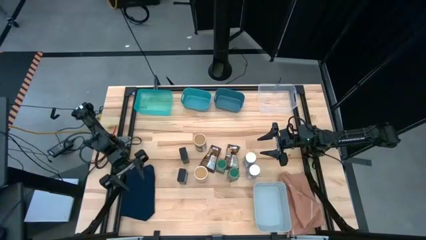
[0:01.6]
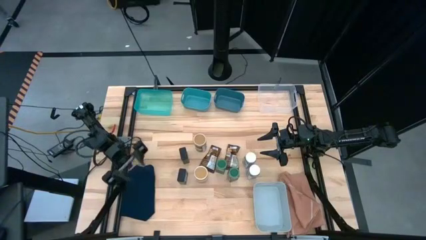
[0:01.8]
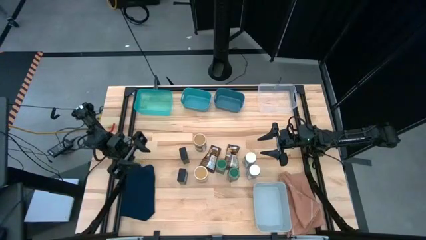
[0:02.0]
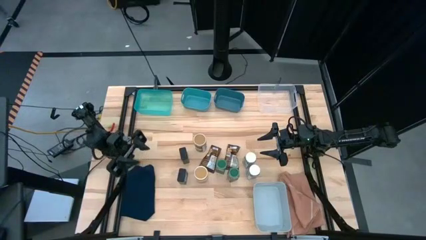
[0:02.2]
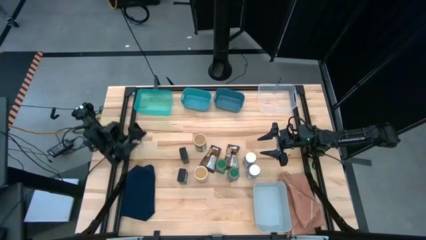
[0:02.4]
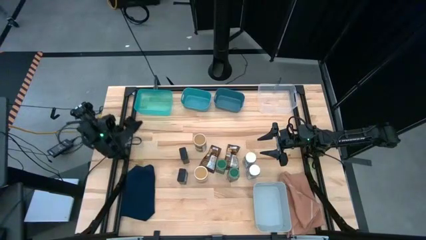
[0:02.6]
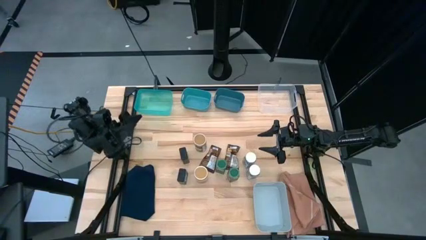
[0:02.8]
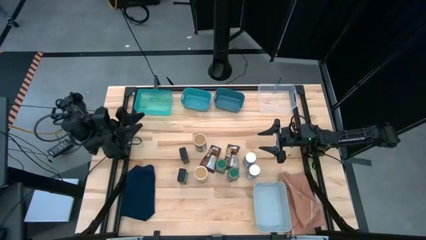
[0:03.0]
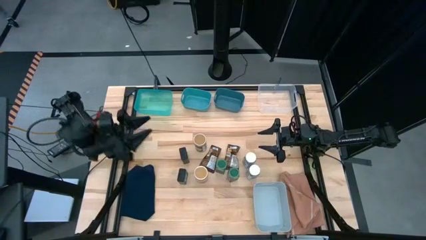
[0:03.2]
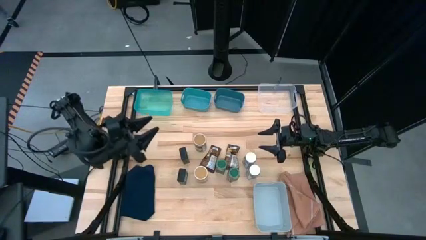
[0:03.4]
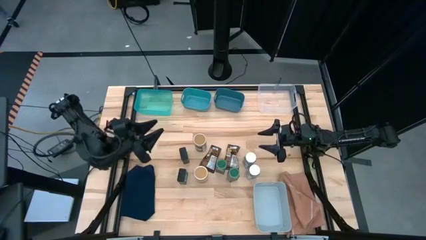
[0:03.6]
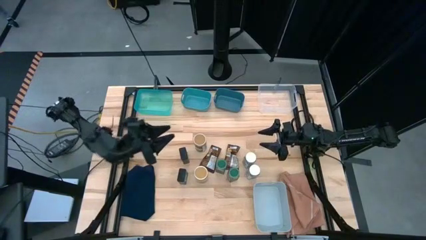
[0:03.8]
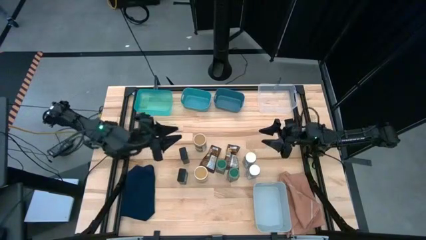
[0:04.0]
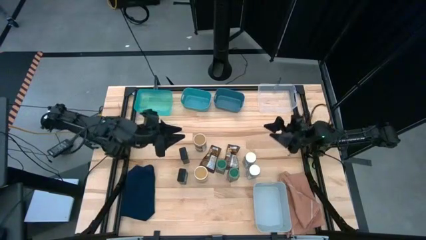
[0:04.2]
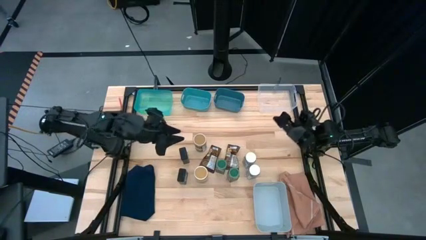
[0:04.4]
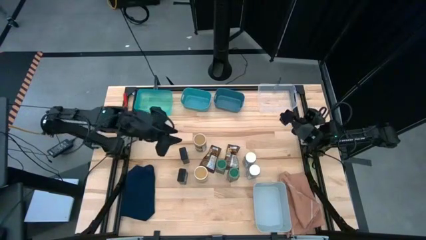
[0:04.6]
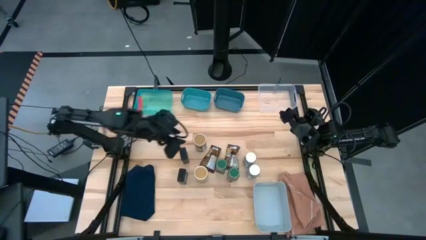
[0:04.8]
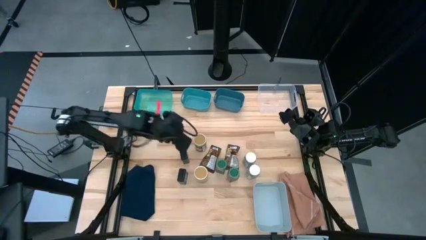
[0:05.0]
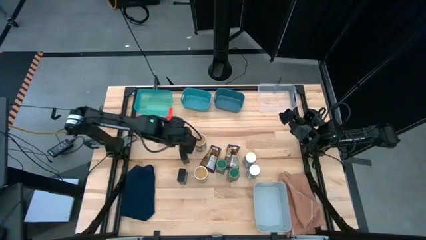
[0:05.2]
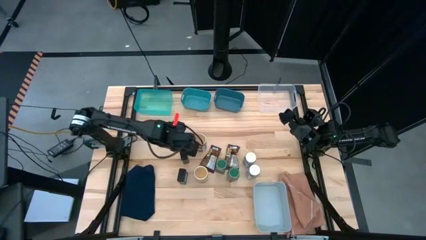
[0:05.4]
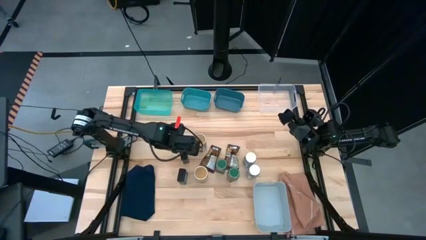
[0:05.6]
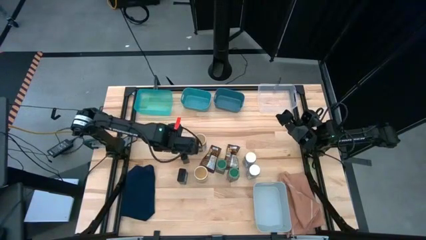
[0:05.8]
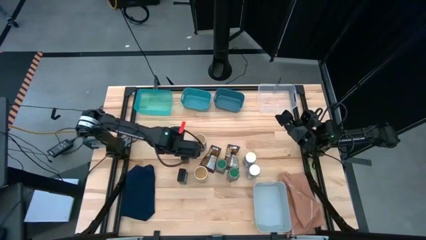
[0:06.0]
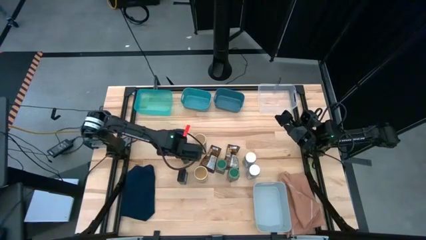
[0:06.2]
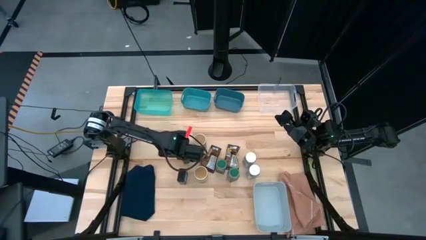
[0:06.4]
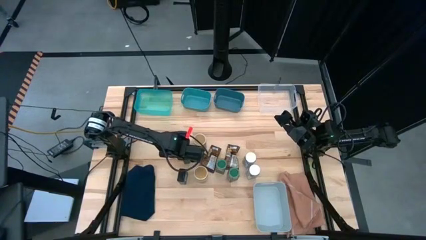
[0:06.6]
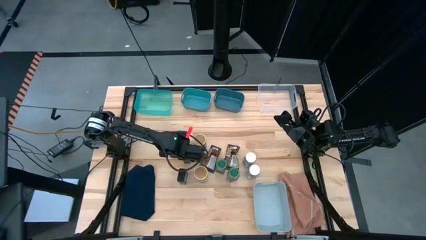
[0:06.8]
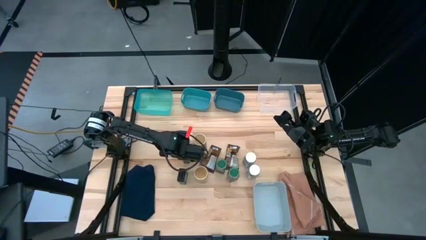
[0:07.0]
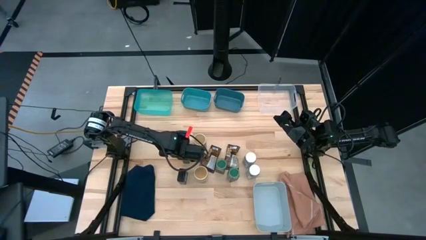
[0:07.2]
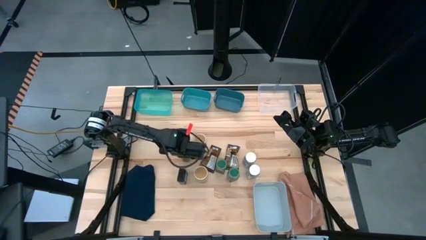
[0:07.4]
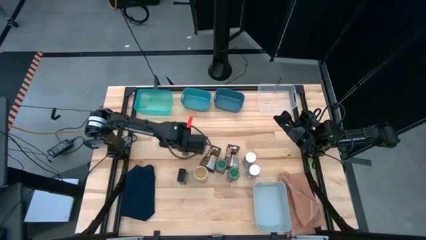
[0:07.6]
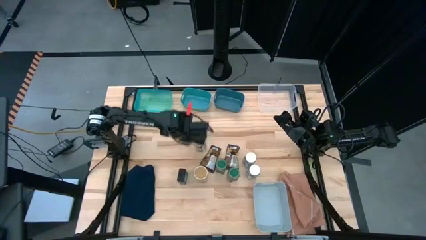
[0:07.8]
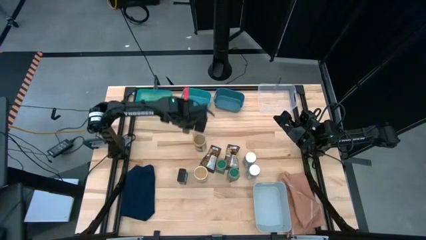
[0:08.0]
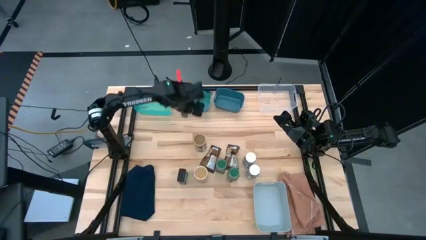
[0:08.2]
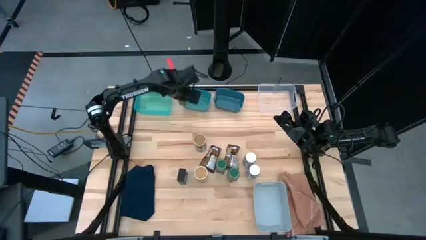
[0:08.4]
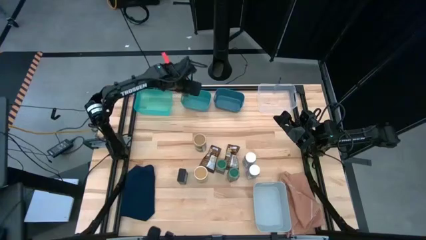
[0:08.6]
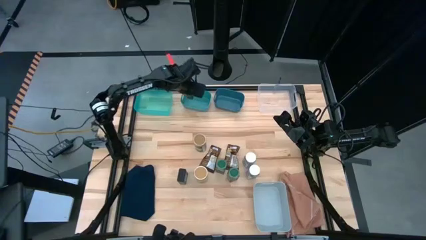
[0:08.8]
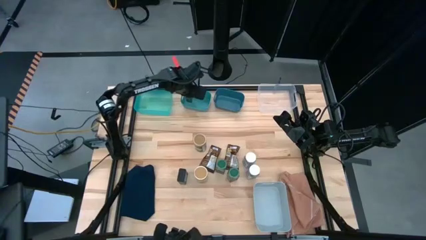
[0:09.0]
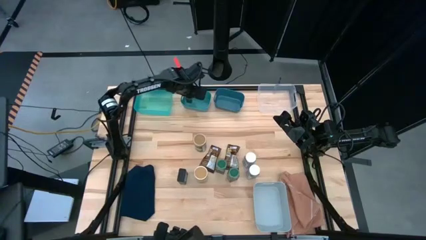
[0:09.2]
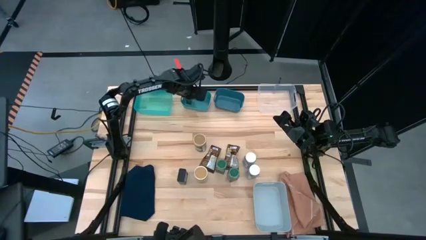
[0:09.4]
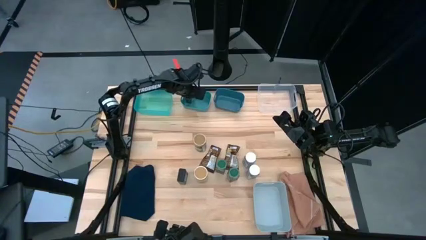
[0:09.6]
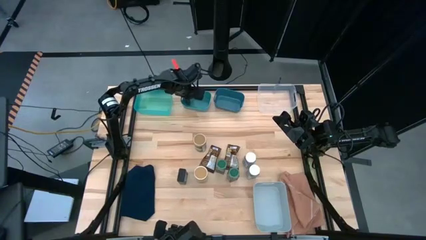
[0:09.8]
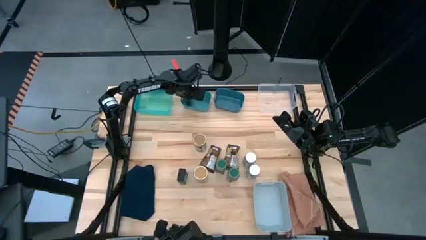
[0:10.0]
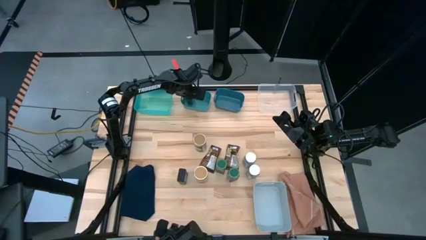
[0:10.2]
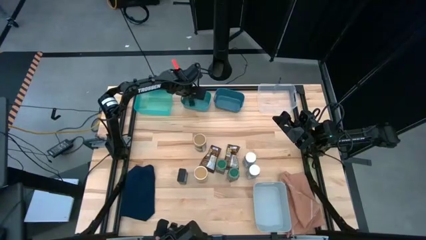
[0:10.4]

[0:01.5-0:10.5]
Task: Sort spices by type
Put the top black seasoning can into the green bin

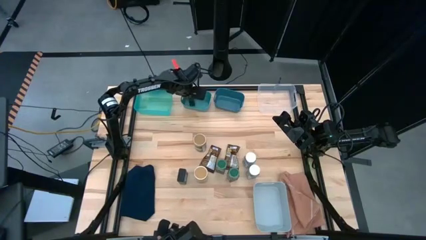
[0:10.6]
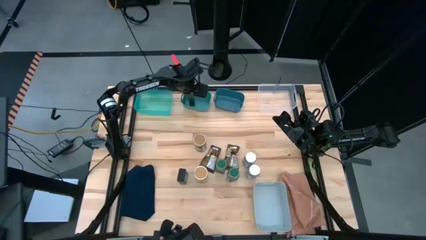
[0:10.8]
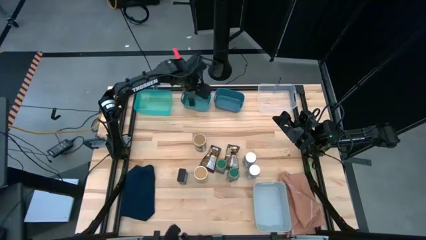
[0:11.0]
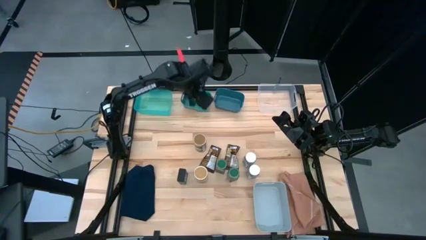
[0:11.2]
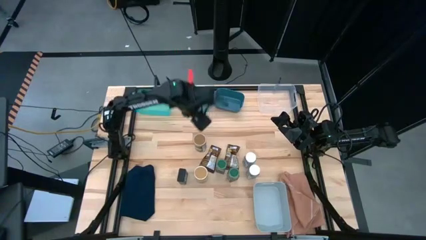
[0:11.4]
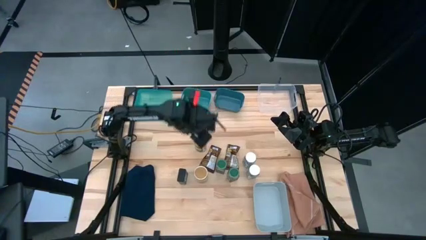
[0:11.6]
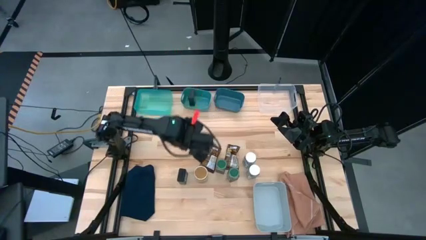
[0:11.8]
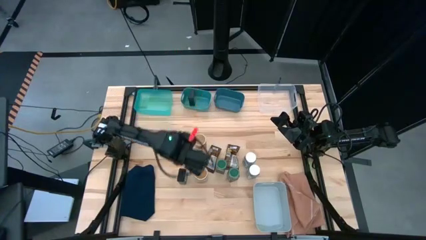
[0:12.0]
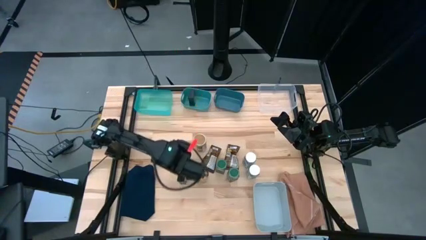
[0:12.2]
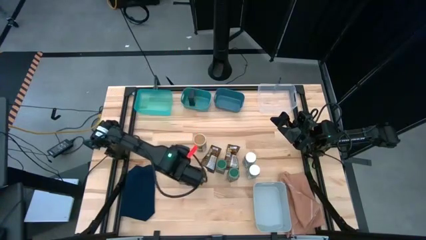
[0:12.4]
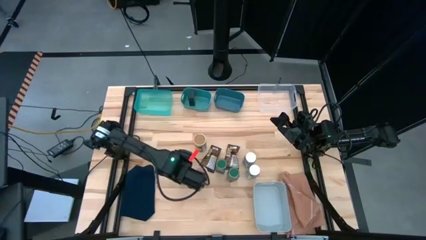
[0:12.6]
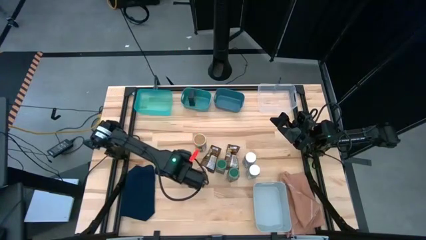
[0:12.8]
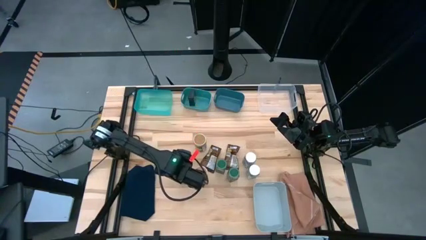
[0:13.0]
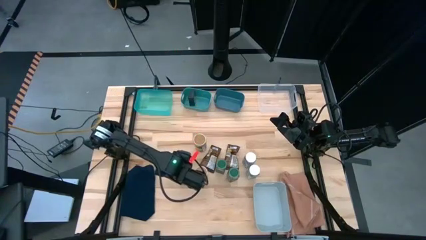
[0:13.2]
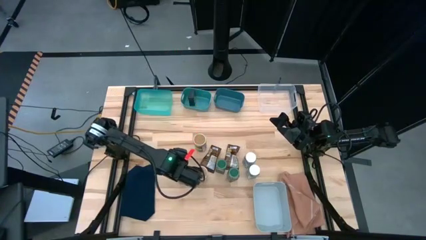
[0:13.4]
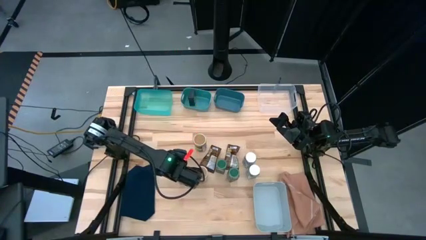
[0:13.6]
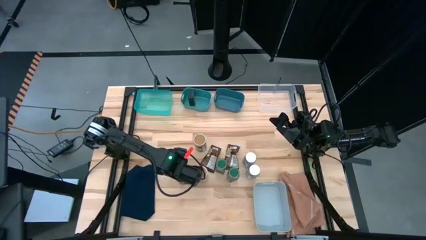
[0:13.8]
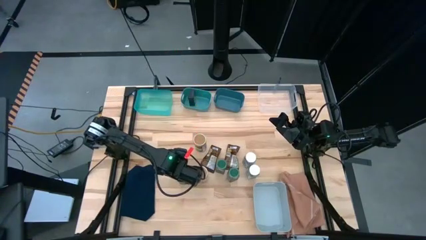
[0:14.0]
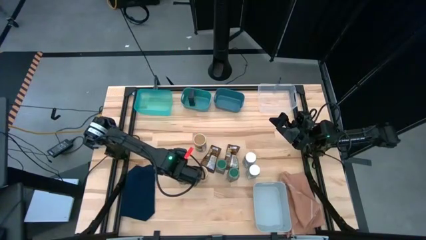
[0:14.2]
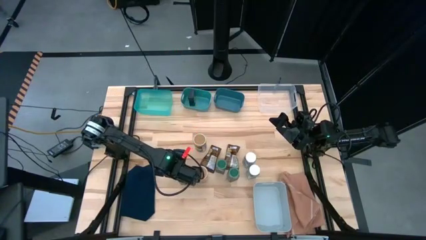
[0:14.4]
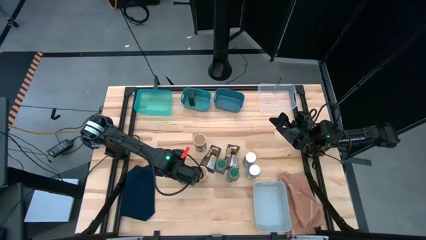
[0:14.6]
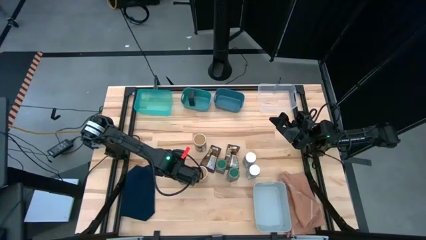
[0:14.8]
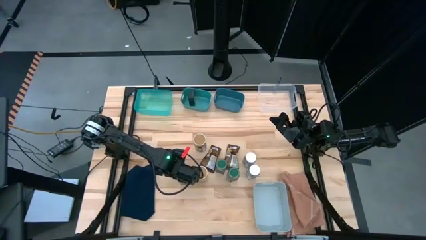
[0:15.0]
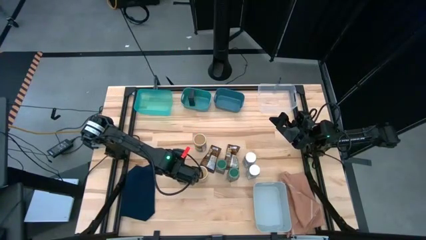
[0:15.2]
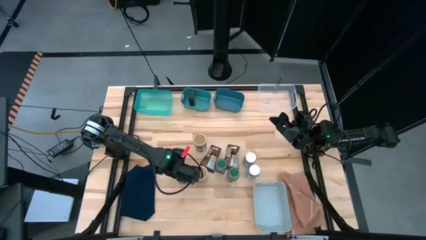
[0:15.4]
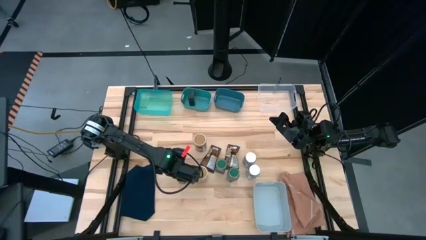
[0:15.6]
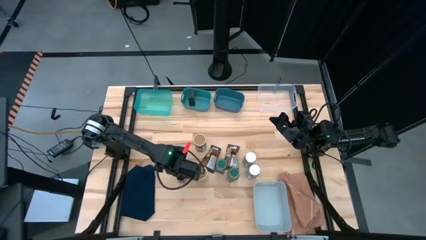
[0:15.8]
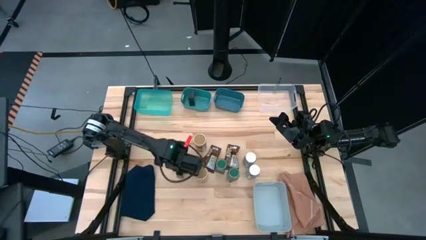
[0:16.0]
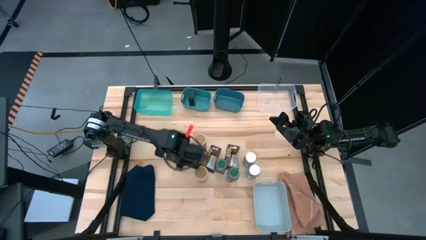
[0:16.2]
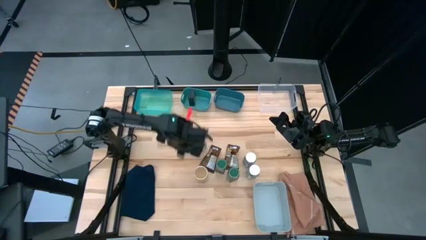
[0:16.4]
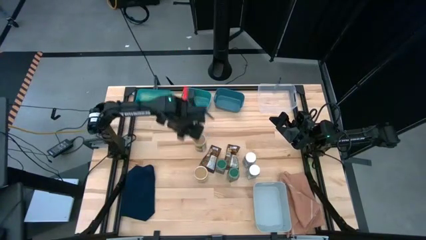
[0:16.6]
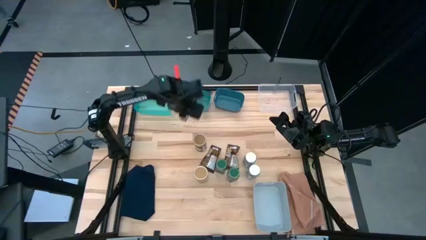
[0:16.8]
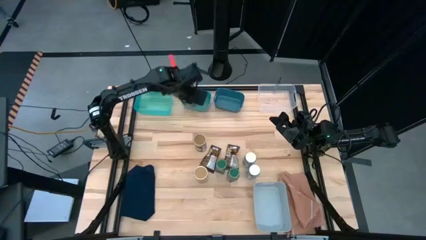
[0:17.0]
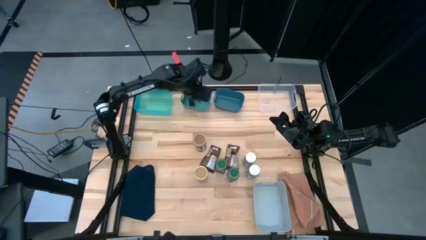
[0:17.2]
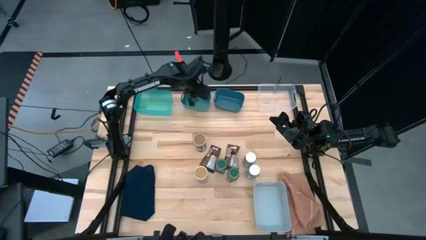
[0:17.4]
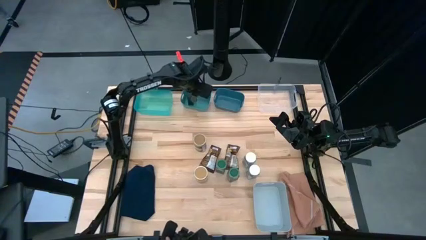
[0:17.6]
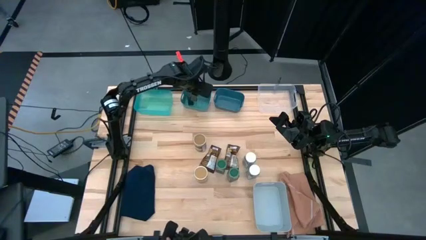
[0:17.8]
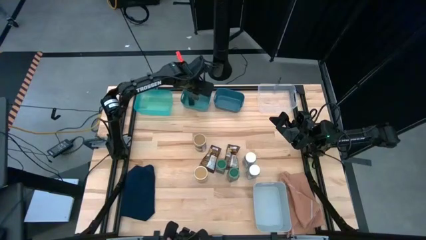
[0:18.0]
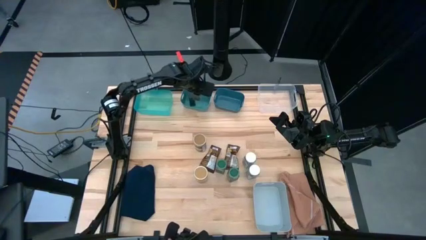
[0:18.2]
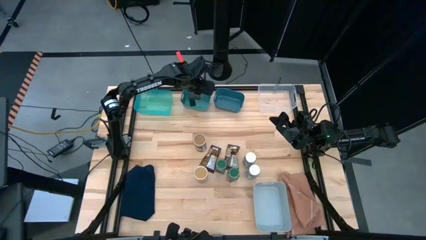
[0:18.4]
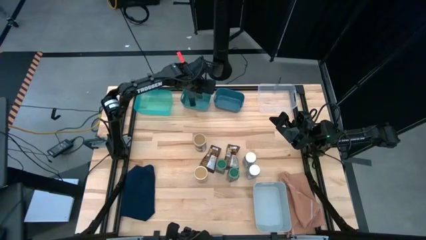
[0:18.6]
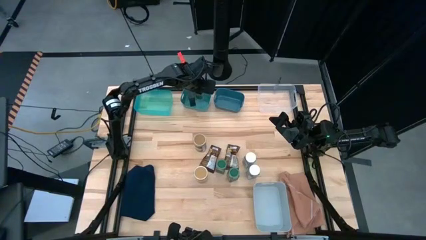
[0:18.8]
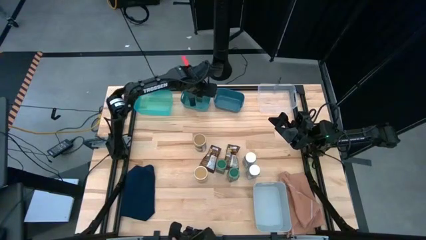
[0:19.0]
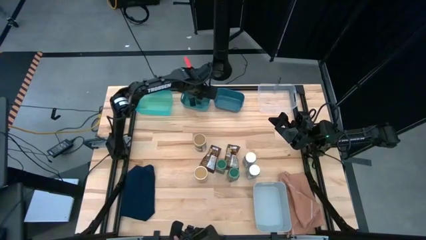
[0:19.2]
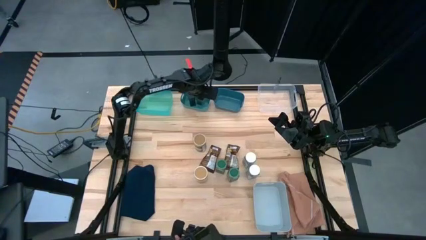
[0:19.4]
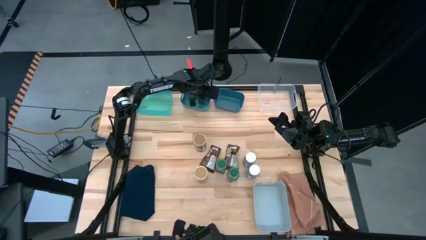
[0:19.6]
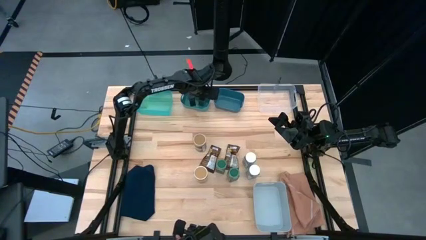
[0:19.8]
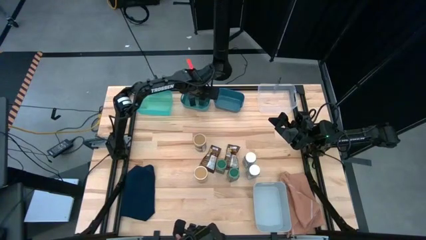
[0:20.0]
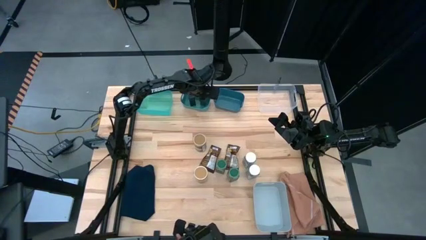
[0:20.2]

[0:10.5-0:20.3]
Put the black seasoning can into the green bin
